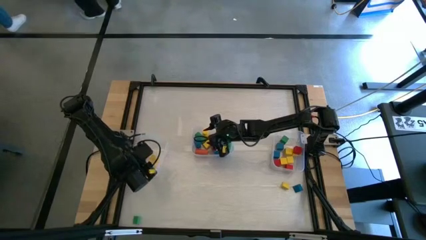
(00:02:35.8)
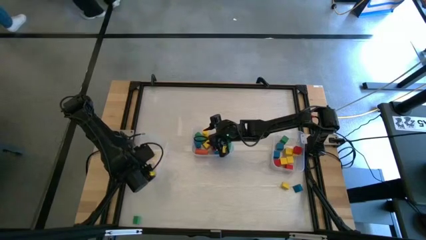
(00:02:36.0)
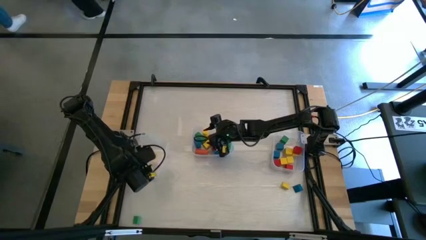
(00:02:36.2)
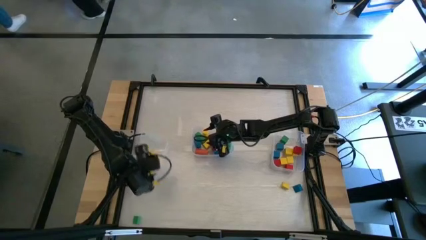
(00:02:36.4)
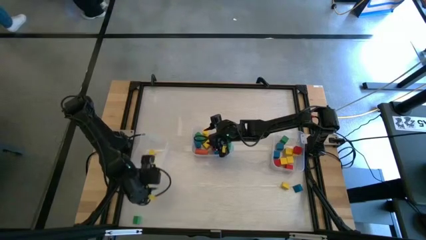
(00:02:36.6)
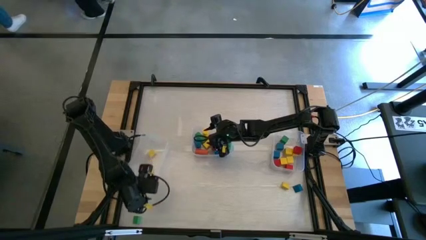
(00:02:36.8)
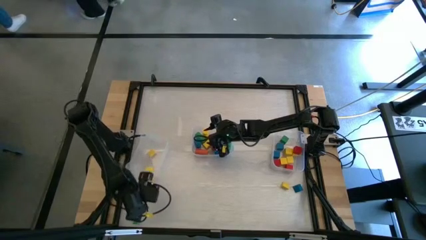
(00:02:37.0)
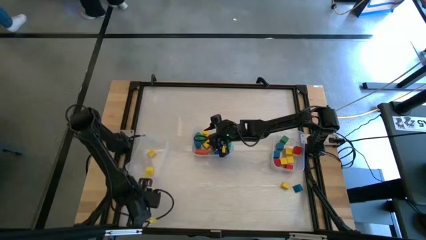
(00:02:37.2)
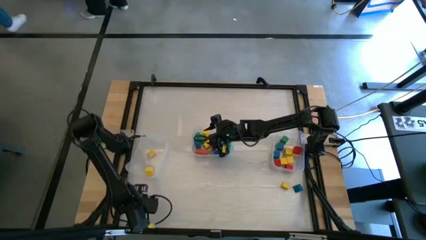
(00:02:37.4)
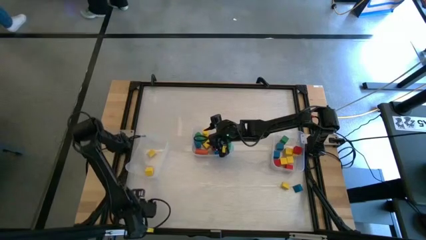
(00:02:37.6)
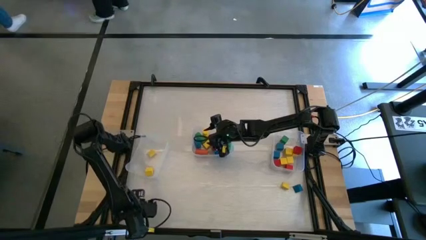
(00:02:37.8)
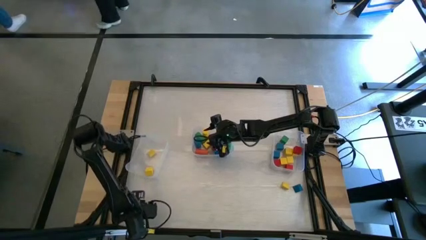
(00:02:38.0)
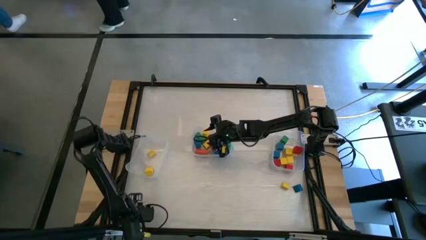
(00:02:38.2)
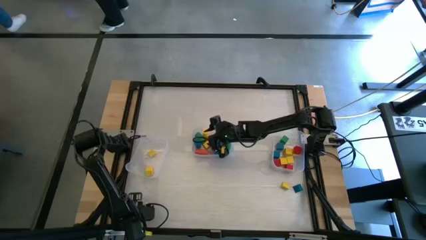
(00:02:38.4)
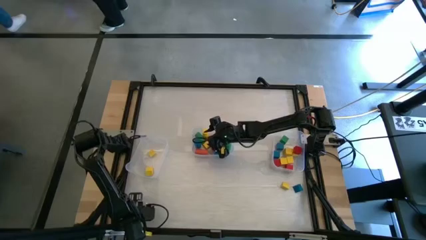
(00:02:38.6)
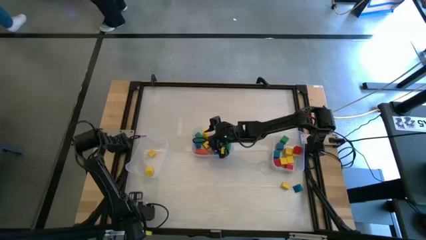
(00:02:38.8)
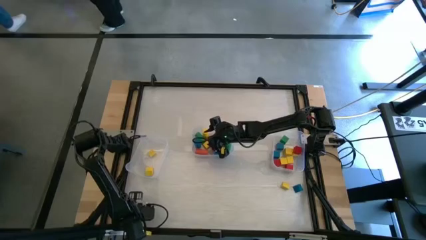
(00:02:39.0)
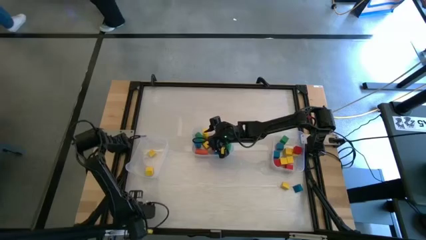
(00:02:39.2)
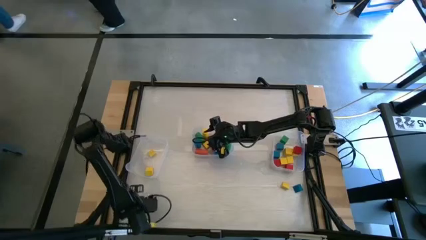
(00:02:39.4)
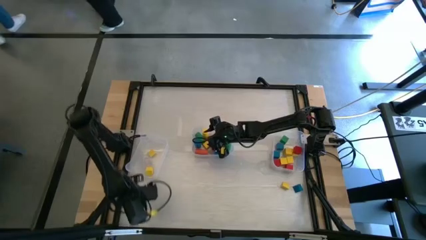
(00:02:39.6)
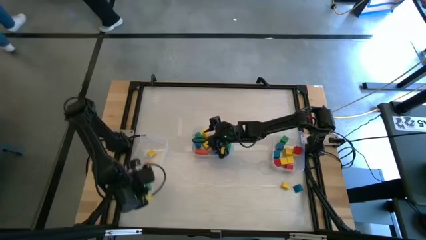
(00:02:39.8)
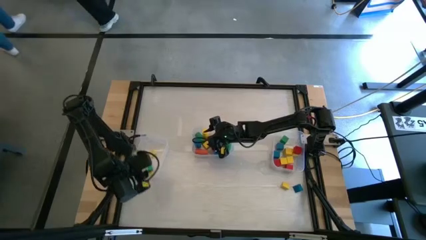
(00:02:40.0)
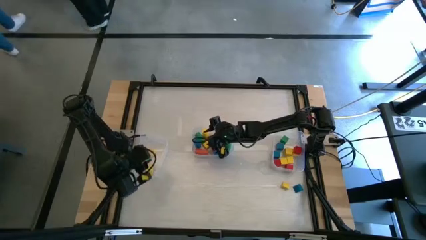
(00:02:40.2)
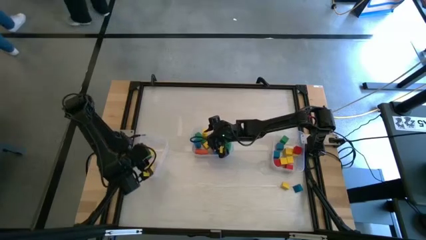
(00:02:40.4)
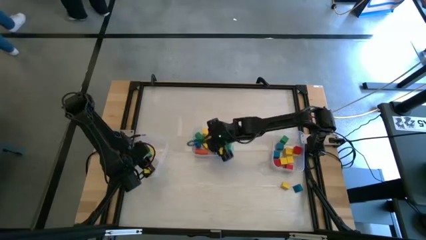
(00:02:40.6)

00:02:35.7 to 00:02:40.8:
Task: Sort blocks by size
Put the green triangular block into the left transparent bin

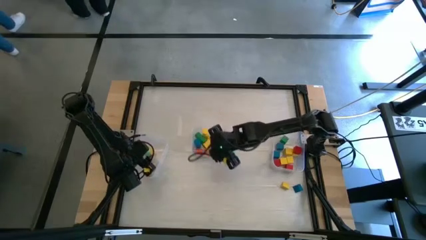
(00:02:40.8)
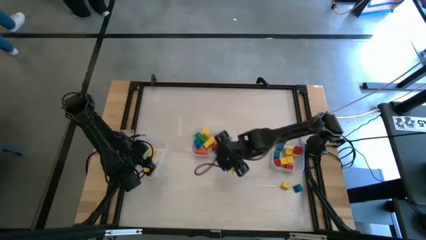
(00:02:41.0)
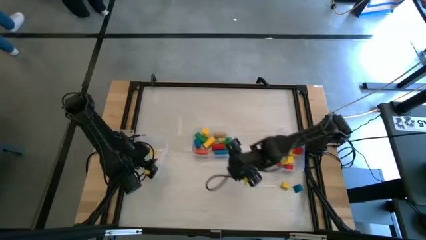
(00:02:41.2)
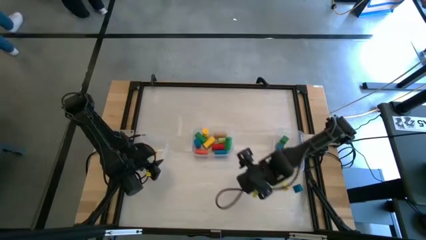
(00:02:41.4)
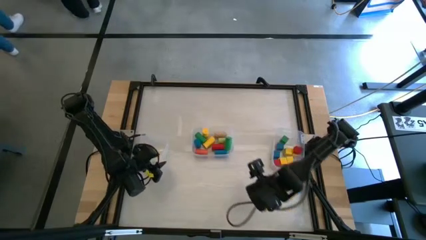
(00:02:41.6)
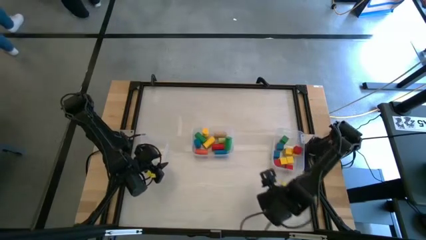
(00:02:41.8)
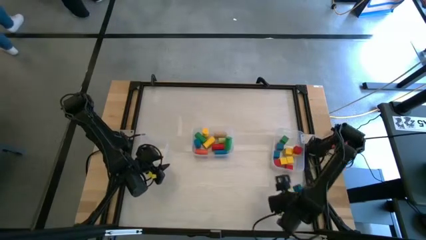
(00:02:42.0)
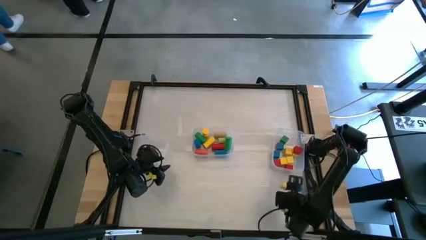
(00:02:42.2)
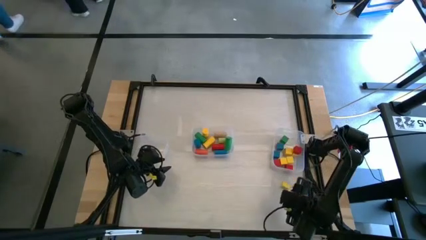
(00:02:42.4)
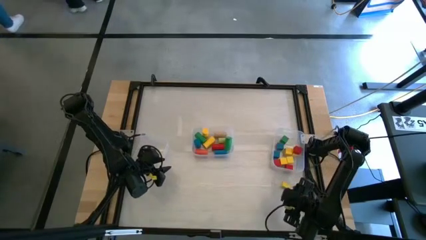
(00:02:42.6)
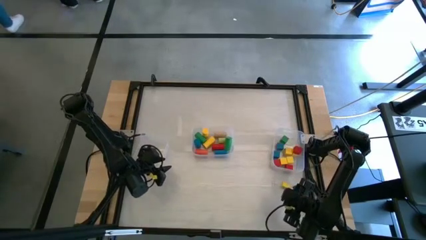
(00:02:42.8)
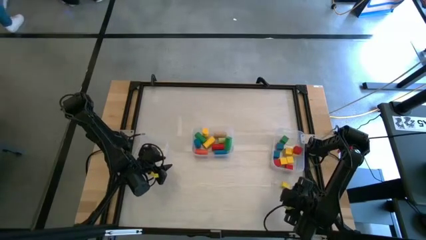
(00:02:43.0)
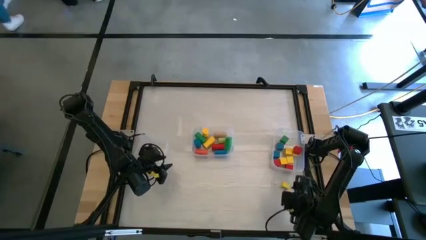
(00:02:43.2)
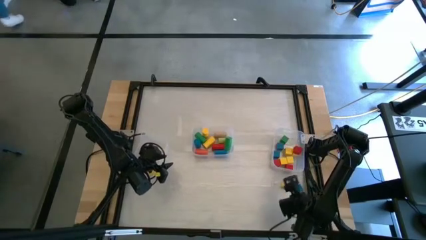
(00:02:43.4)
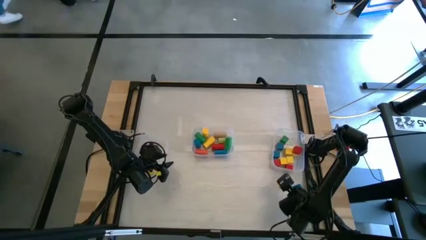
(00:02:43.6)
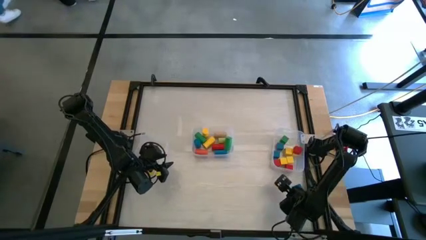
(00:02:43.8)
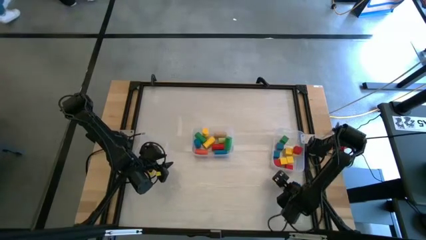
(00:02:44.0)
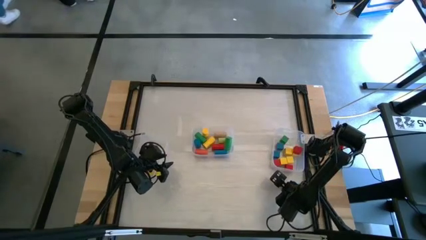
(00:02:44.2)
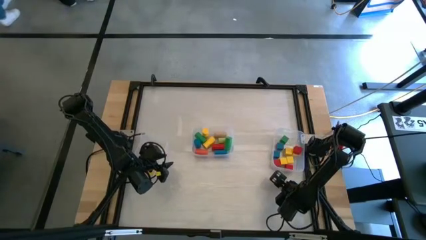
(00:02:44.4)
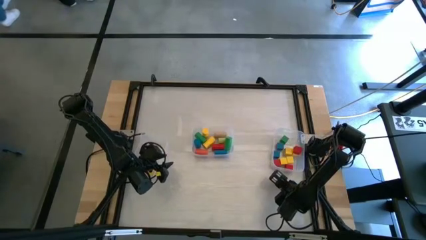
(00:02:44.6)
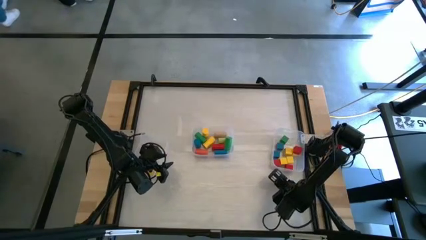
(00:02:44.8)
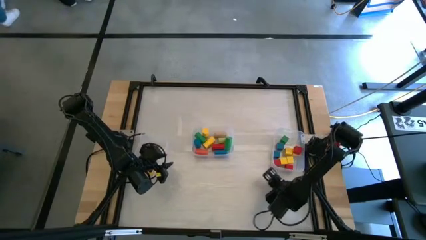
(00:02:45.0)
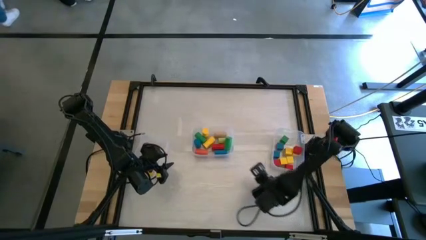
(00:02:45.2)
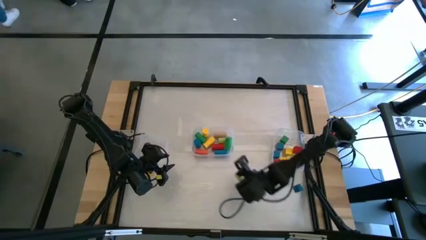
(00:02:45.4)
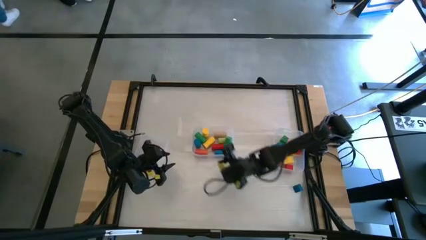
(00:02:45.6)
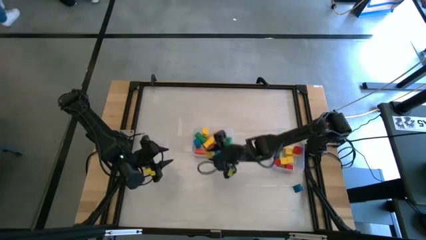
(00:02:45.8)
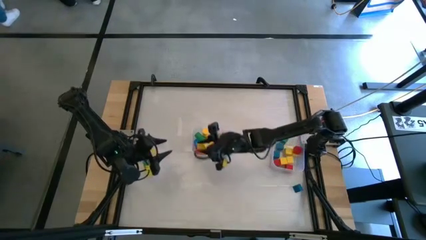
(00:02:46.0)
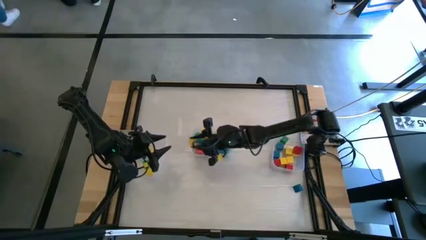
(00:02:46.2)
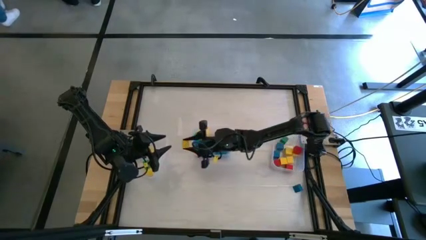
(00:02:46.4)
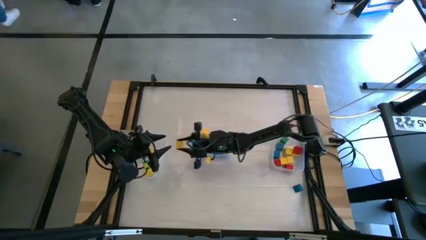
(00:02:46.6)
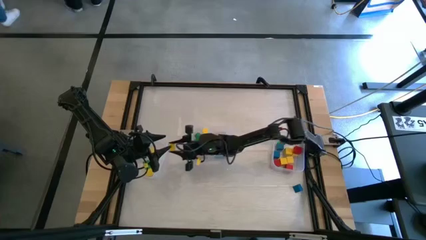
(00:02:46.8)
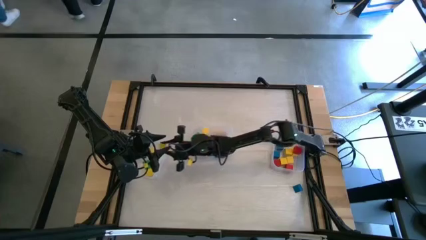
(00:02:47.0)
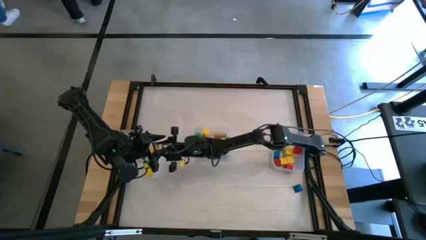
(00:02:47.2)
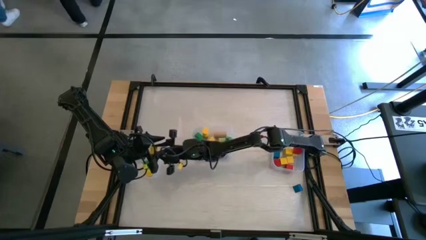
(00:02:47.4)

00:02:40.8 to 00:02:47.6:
Put the yellow triangular block into the left transparent bin

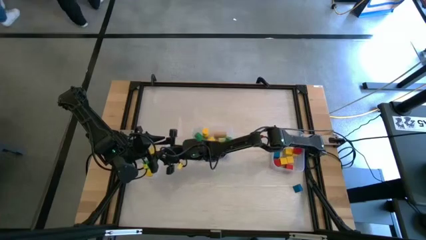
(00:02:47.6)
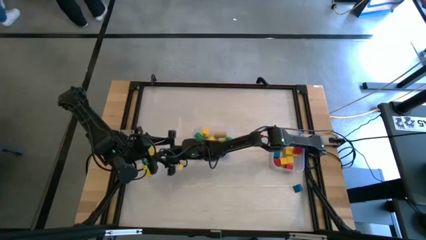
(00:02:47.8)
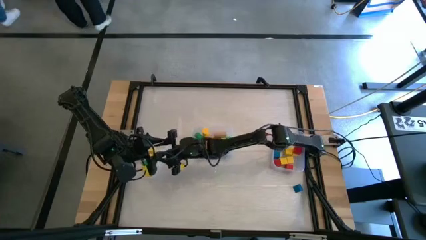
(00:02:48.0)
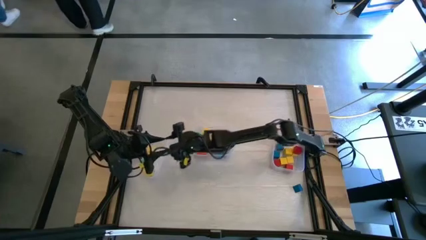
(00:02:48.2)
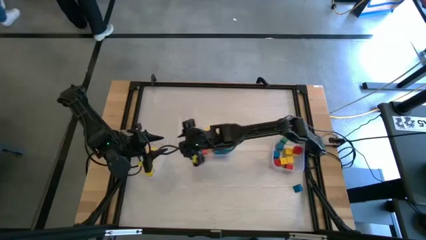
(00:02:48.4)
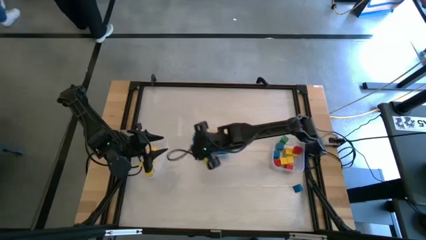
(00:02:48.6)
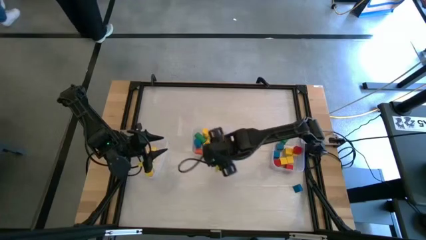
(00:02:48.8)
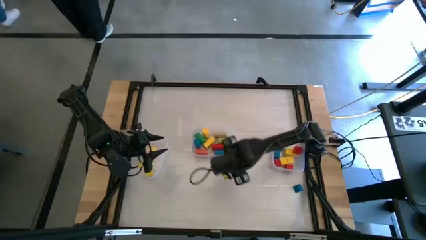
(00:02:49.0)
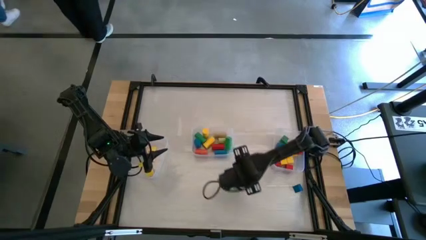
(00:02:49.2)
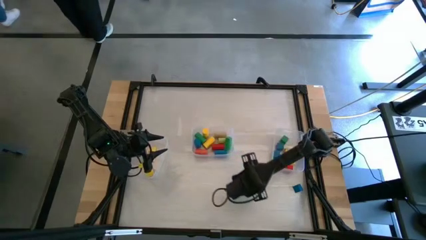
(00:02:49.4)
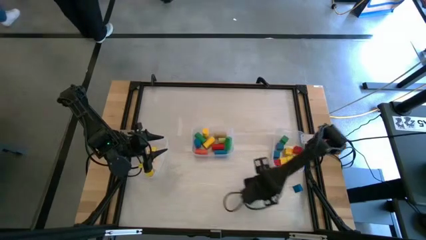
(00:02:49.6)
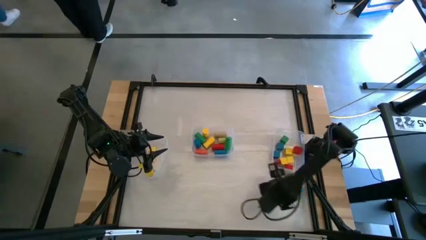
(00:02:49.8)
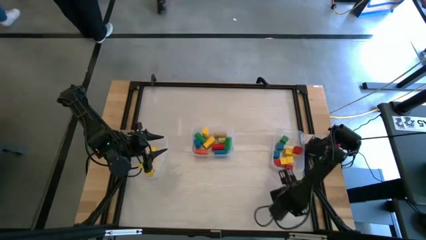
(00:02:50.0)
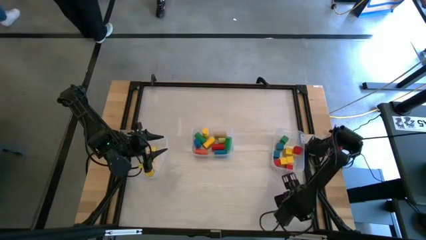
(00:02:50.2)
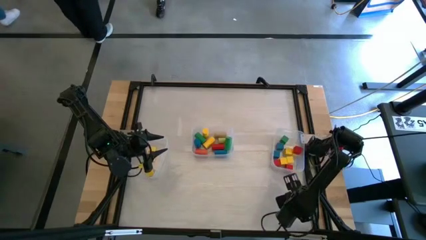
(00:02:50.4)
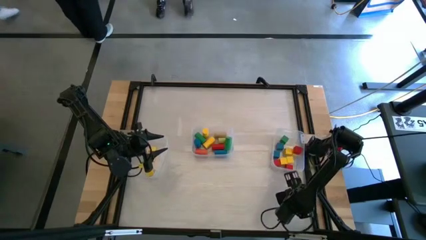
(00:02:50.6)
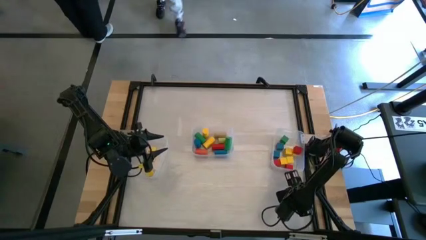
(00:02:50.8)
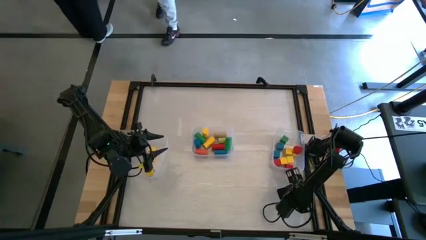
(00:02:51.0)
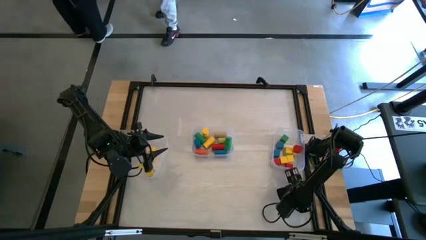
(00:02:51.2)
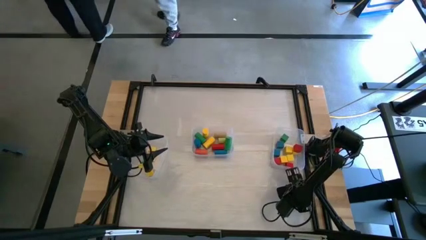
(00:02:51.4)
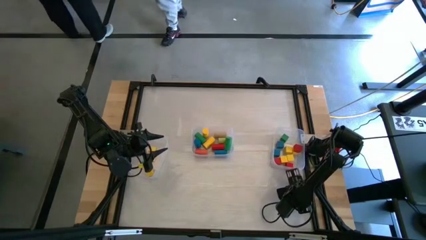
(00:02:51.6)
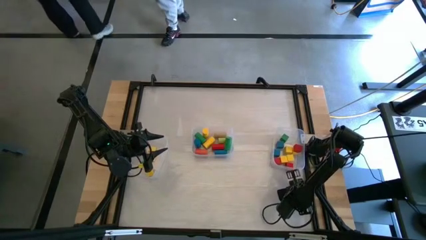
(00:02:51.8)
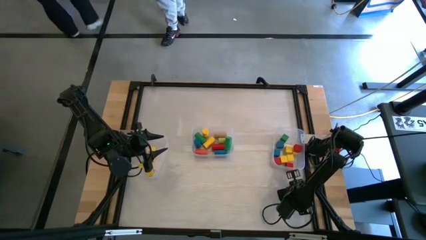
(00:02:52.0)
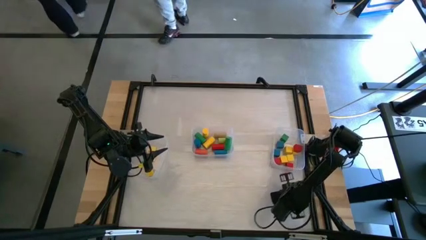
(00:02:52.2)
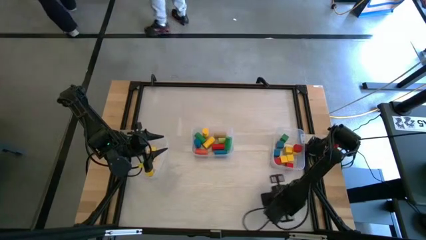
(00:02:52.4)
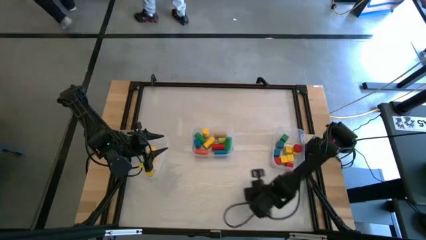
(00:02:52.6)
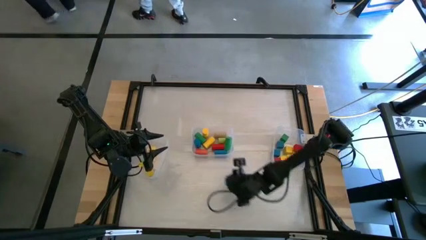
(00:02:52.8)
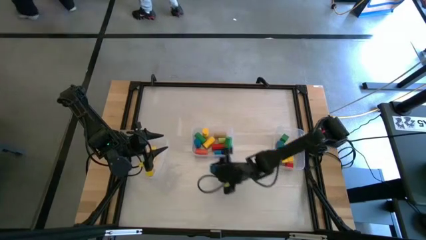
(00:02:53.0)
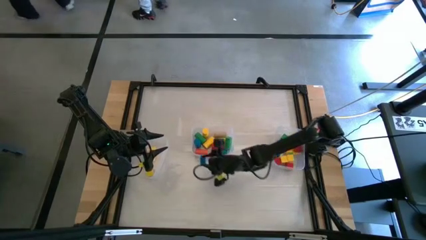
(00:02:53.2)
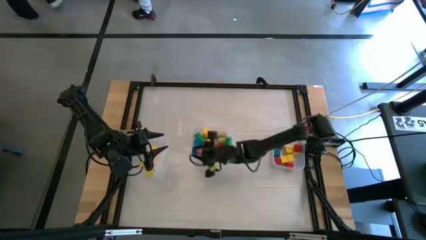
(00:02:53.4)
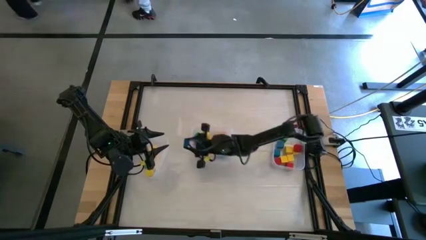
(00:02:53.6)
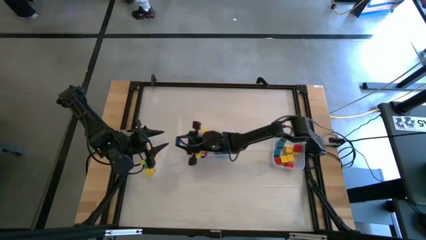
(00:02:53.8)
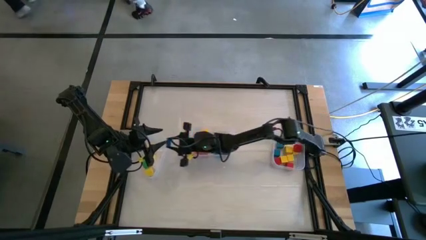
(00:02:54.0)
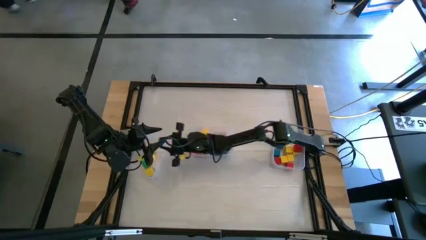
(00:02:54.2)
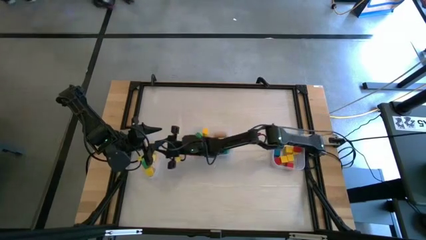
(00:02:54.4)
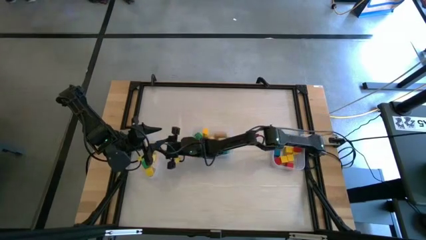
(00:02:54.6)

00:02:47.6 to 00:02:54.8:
Put the blue triangular block into the left transparent bin
